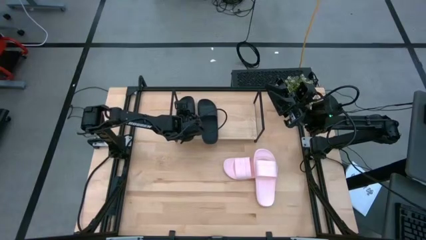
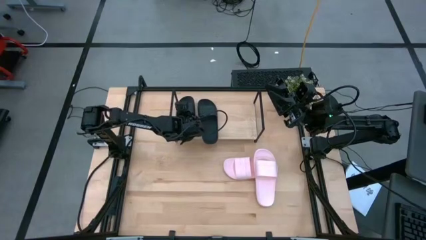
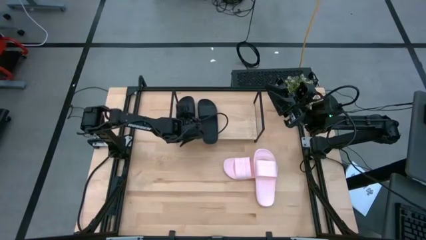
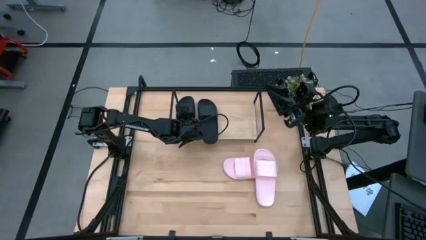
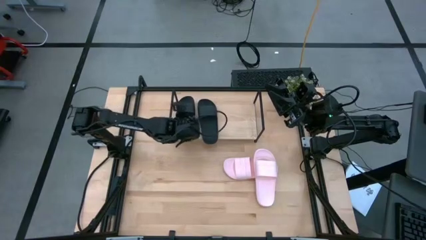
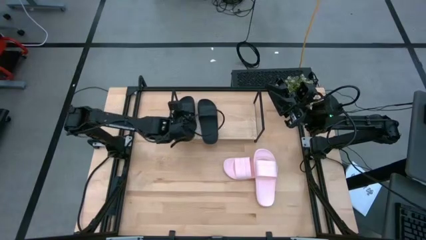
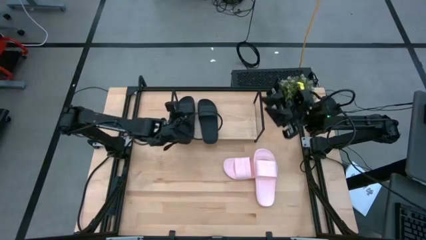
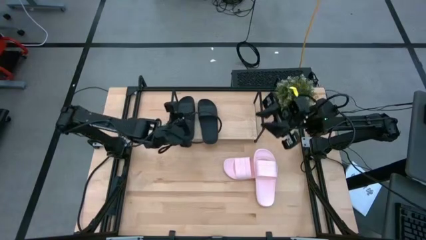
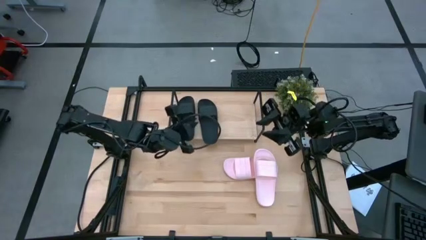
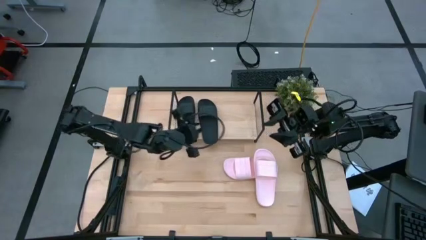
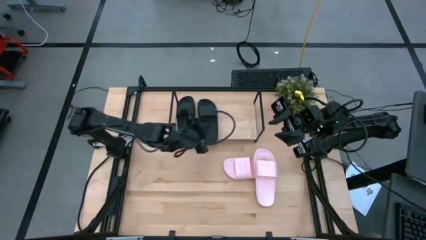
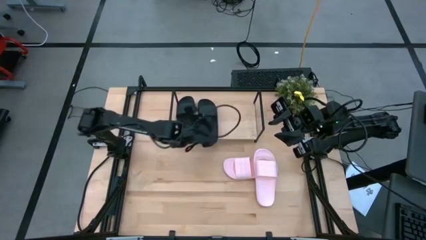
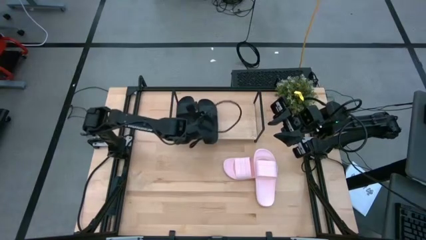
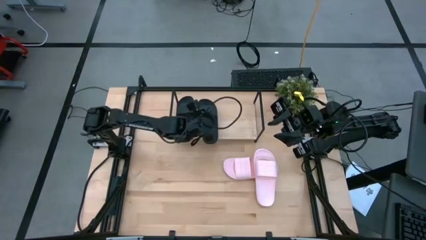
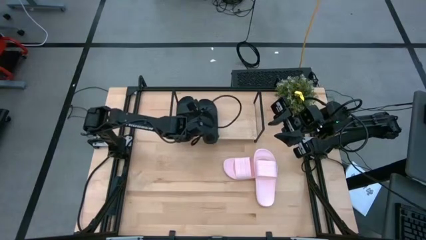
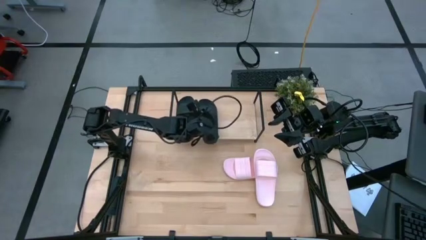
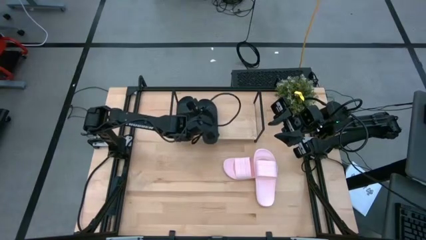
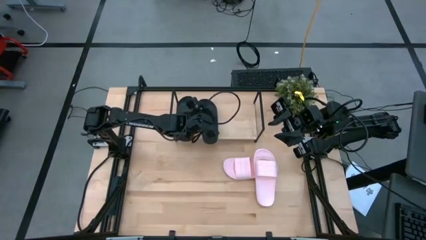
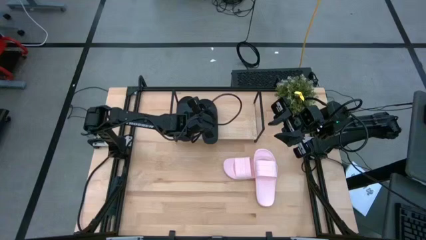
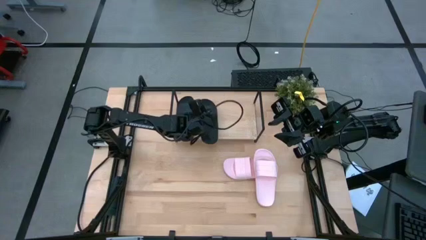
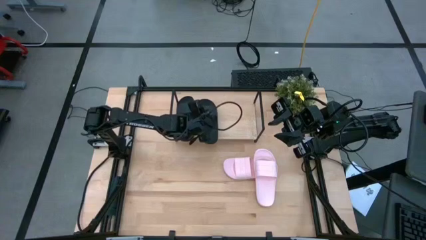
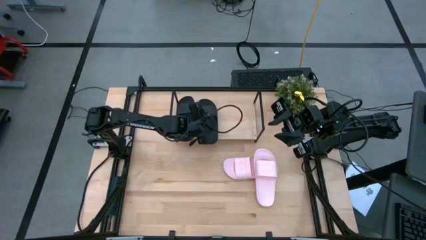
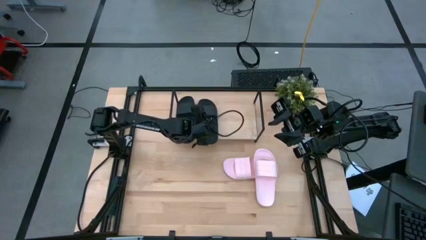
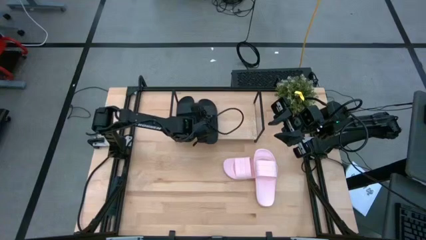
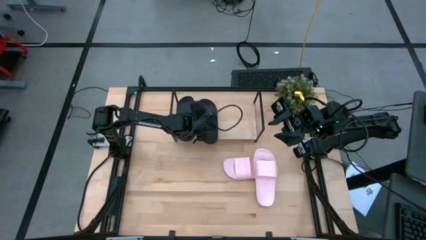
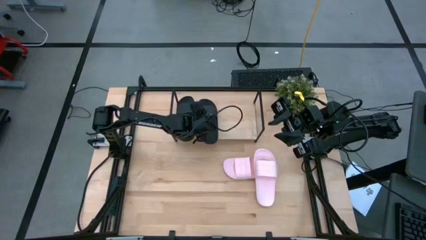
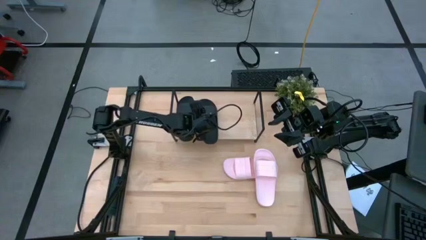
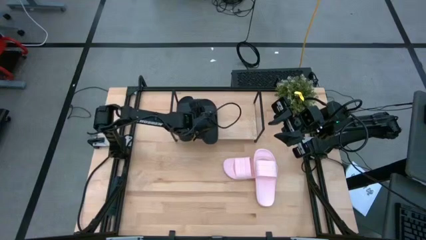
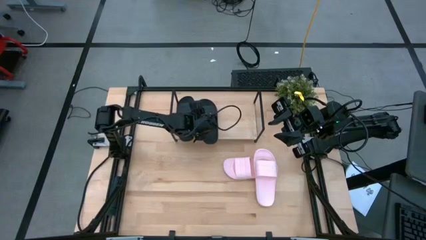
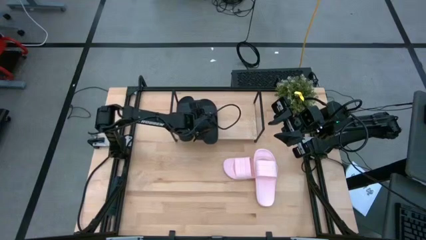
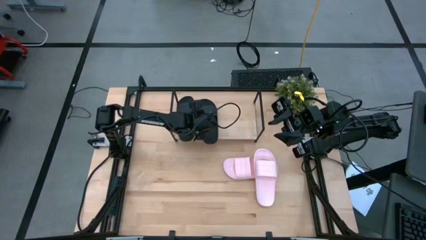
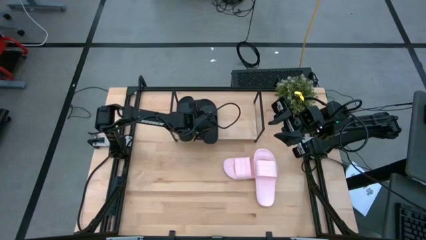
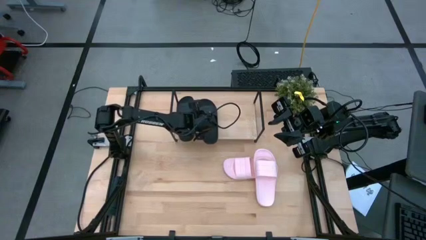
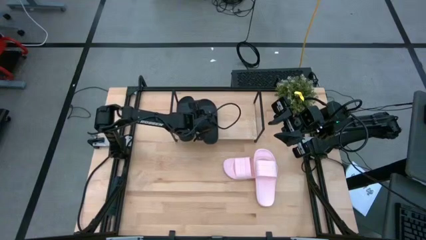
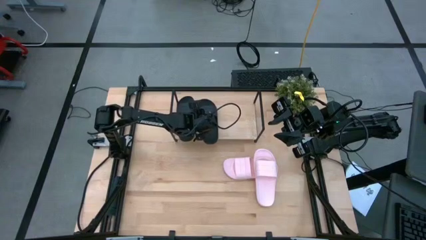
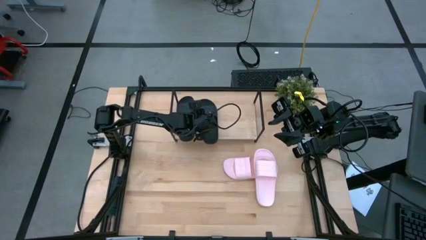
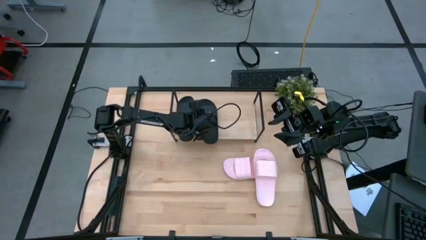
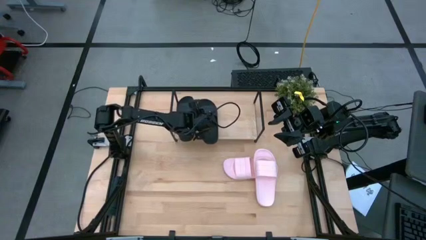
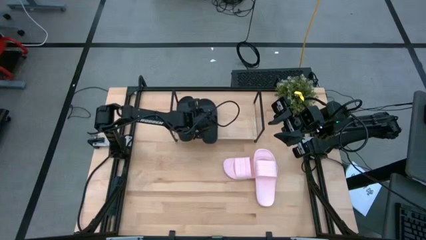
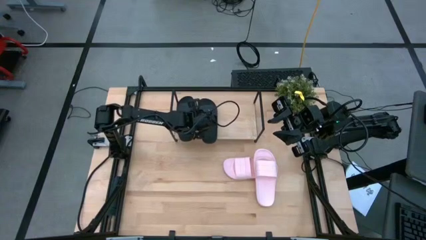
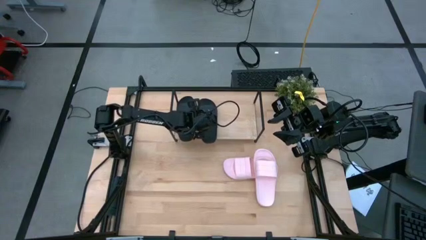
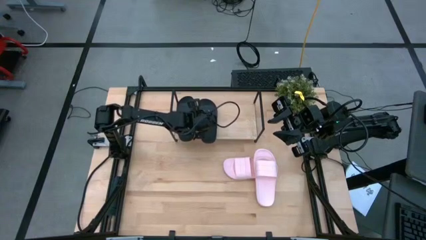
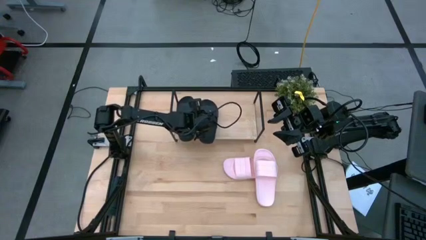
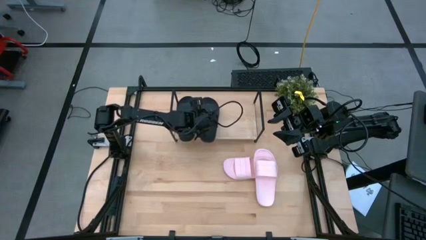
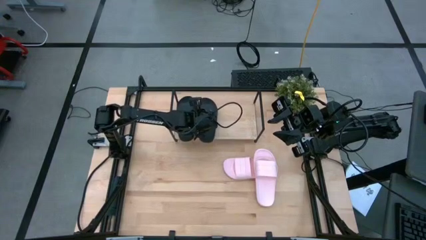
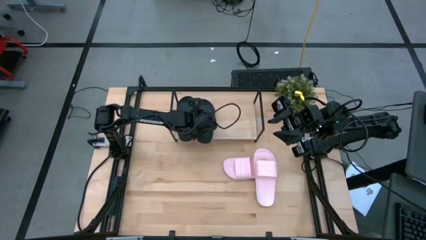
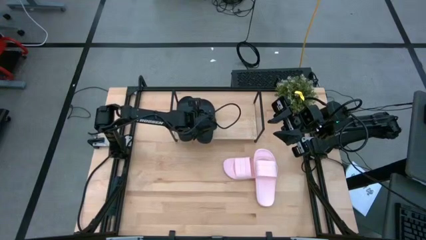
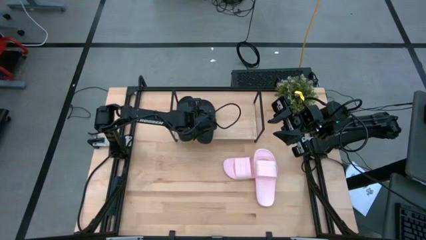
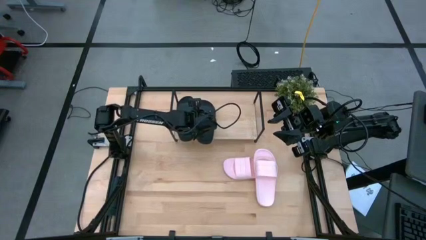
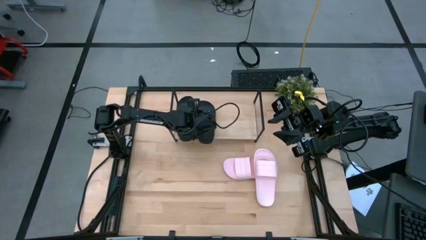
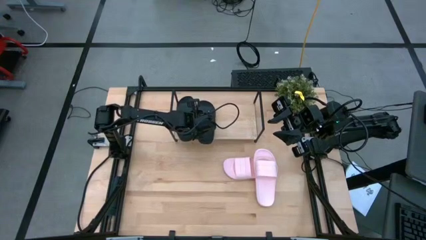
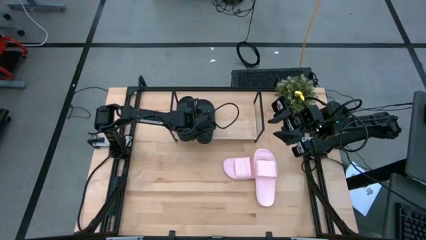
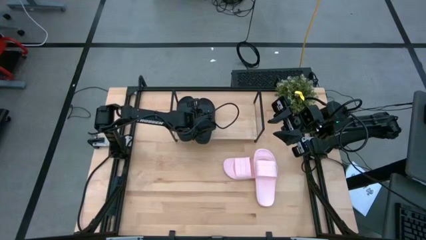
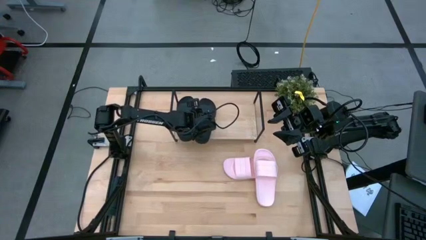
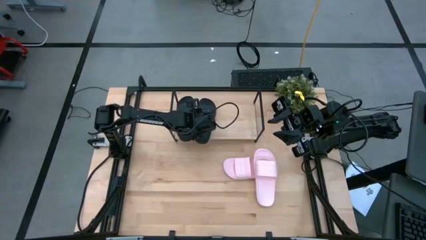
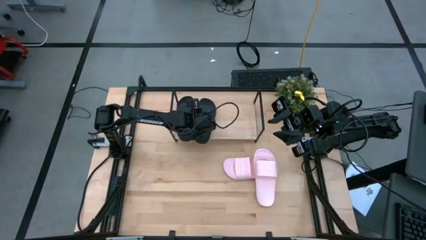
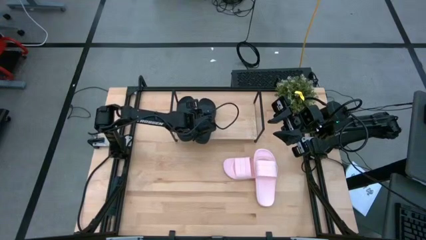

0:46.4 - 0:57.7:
Task: Pick and place slides into the shelf
Adjust the right black slide on the shelf
